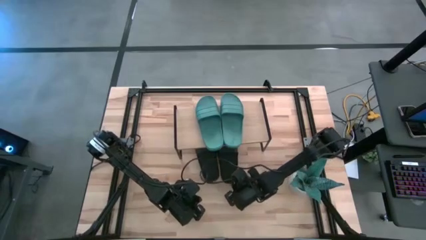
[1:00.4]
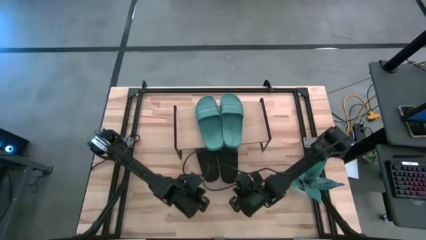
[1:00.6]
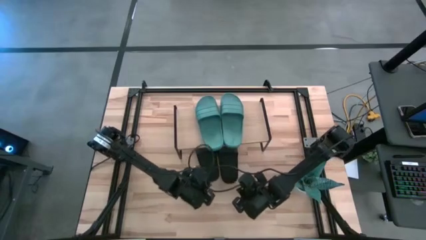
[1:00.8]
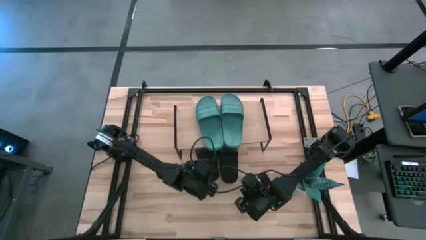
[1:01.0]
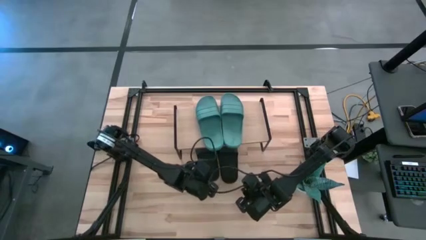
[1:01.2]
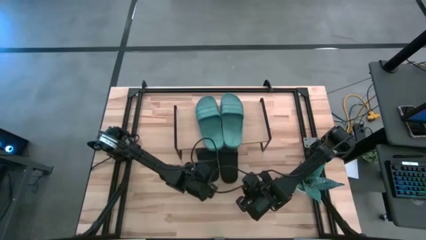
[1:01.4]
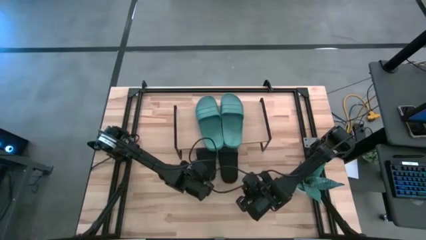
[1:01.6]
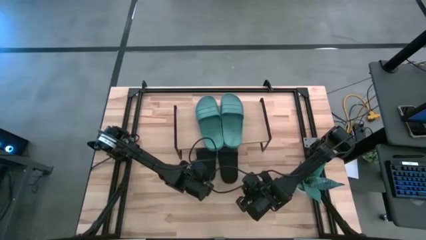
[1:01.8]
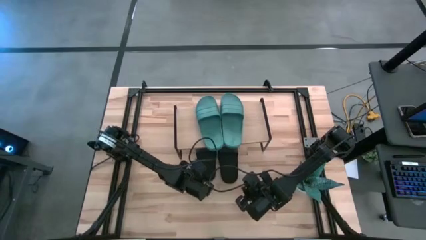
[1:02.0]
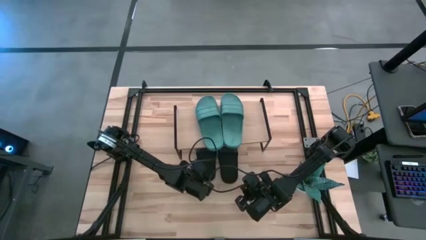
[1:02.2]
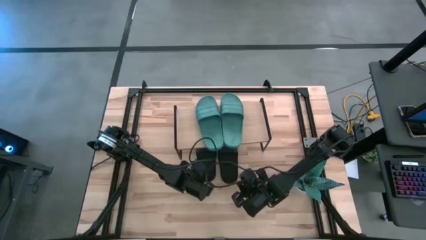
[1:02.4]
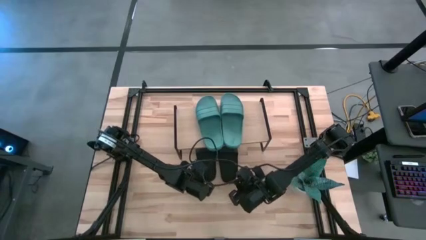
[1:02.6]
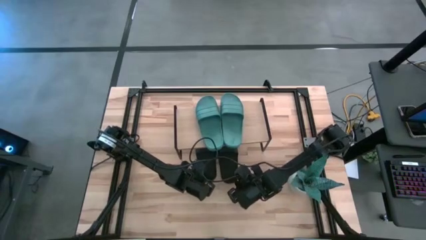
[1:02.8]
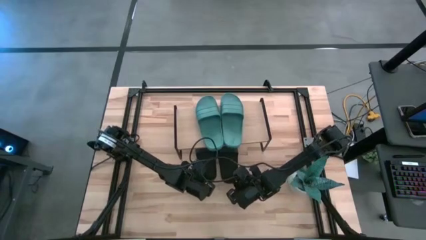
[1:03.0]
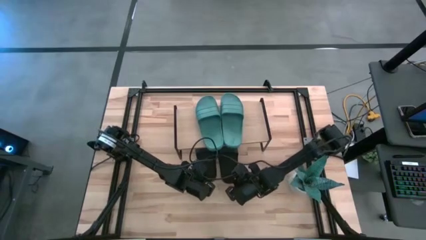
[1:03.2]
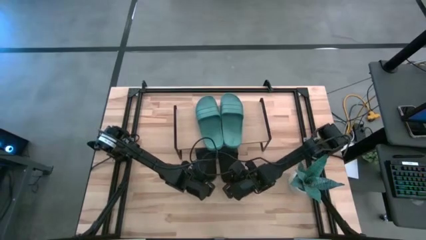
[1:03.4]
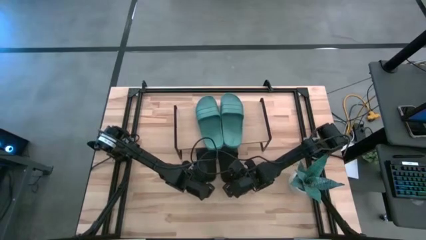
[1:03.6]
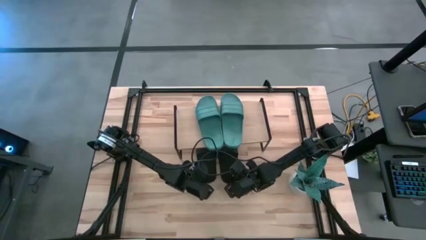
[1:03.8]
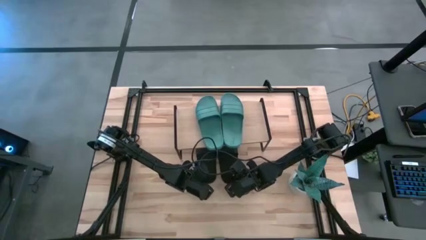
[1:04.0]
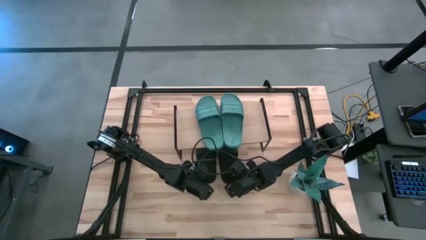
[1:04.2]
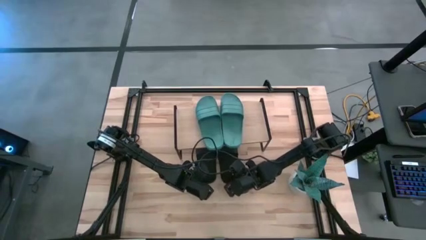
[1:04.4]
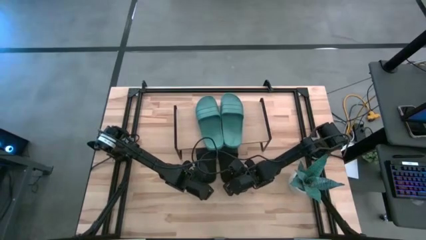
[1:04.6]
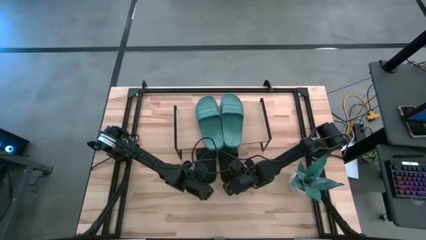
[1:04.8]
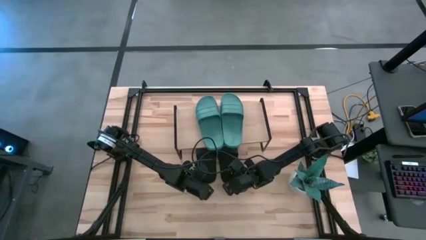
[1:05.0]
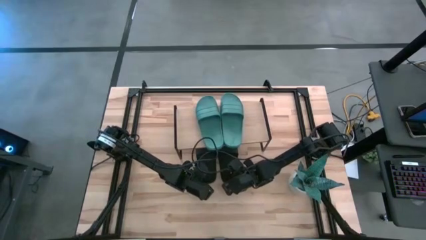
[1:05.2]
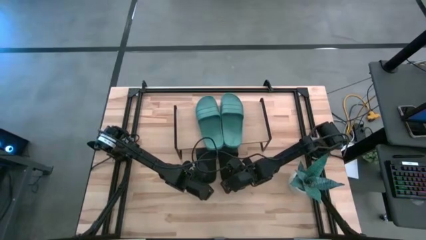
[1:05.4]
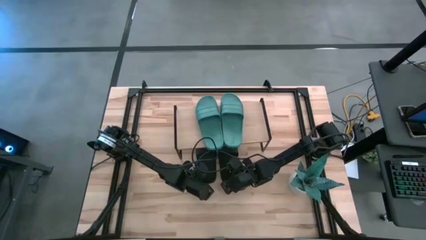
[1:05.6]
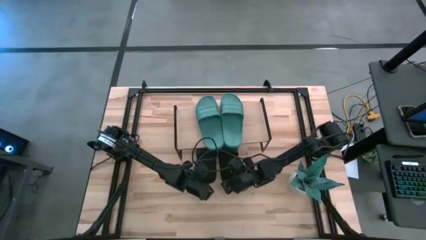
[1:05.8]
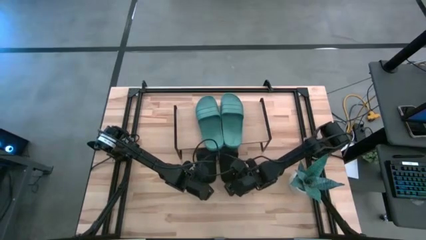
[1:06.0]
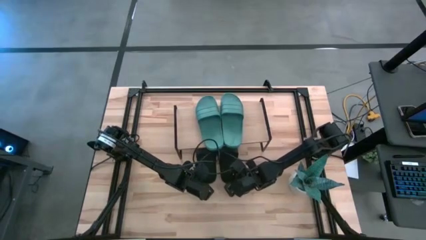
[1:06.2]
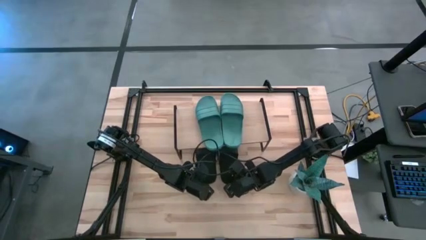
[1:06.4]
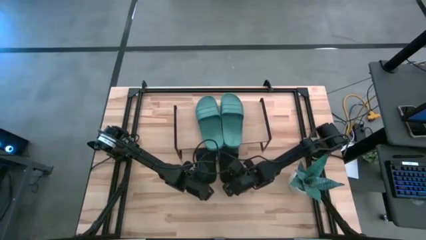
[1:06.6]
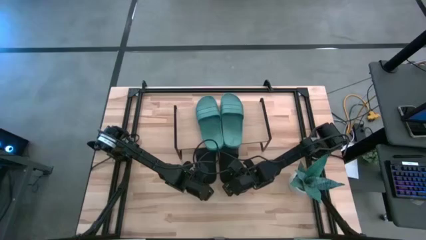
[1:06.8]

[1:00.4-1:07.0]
Task: Pick and place slides into the shelf
Move the right black slipper from the center of the table under the shelf

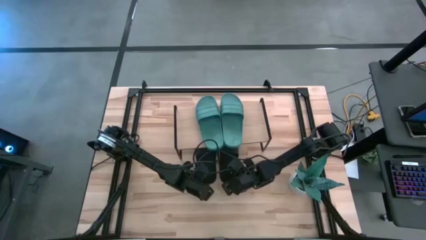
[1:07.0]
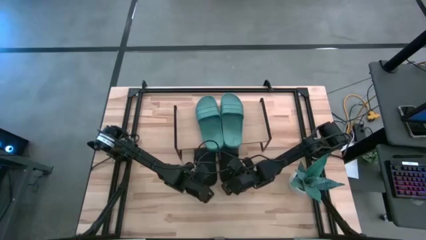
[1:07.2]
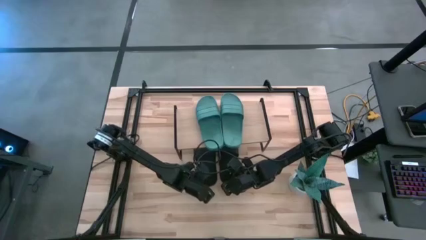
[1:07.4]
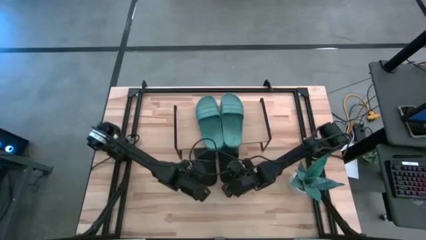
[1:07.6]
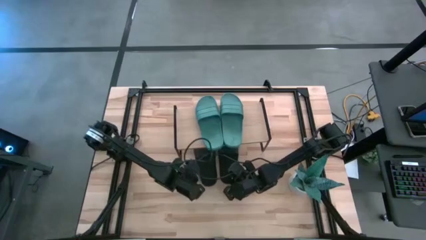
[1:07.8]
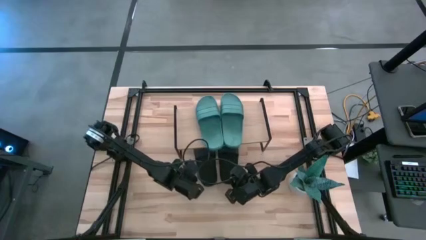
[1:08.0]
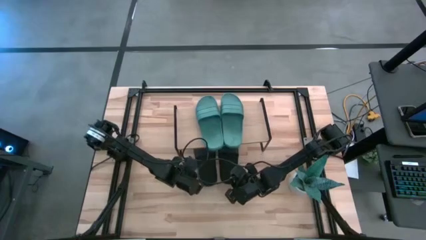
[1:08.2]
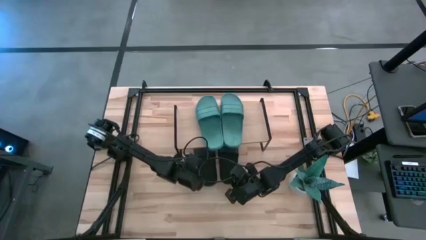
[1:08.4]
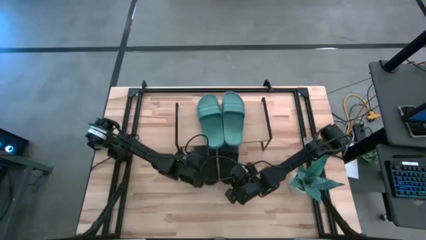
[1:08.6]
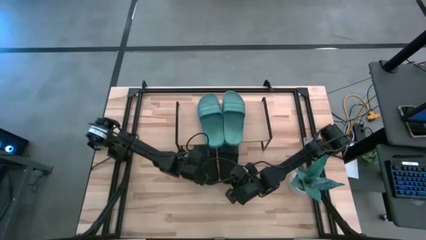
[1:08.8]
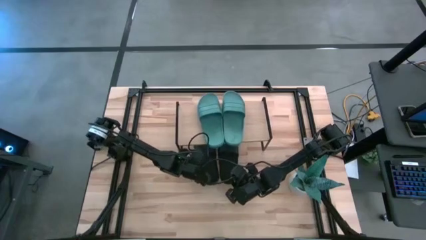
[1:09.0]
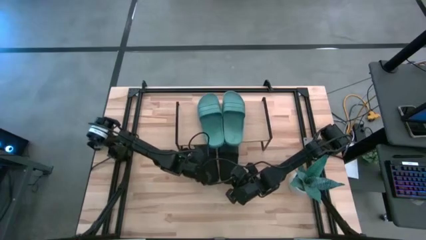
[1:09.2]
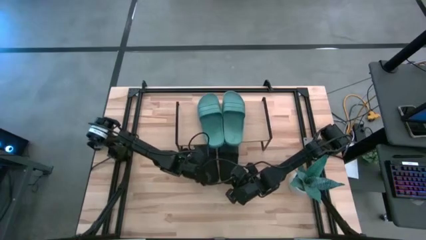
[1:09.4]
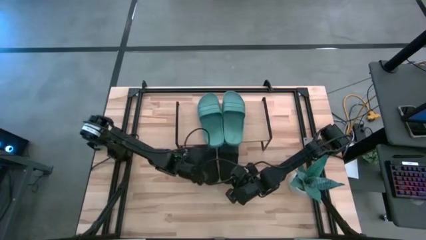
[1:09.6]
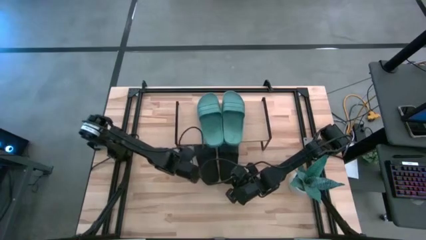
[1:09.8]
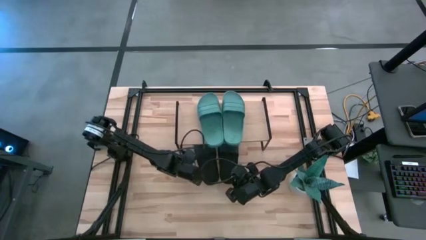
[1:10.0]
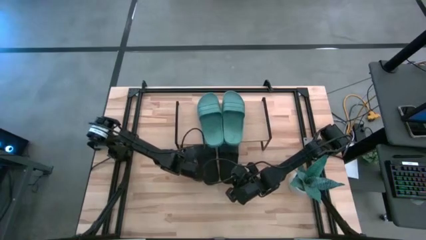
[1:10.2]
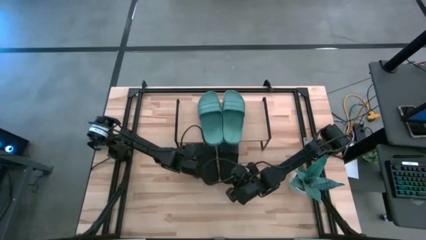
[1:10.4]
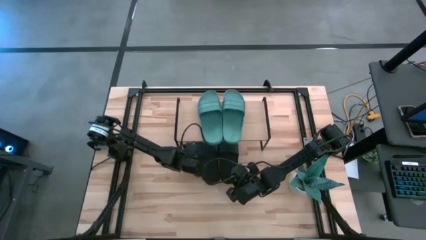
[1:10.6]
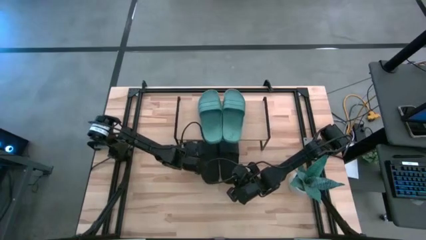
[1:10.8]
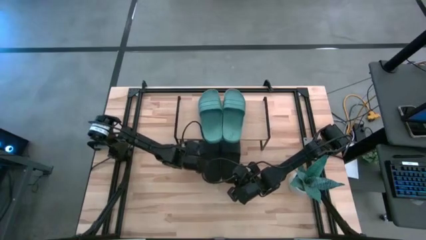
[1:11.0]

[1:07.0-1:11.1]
Adjust the left black slipper

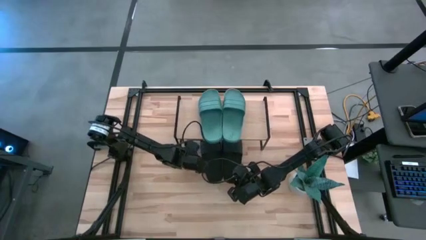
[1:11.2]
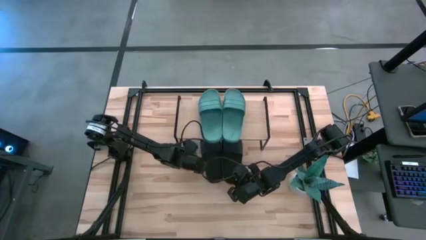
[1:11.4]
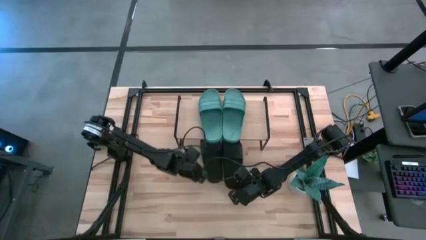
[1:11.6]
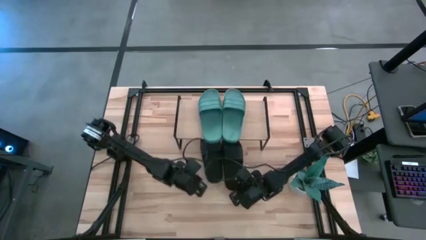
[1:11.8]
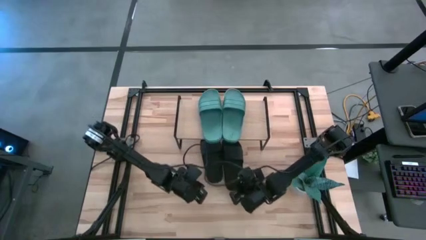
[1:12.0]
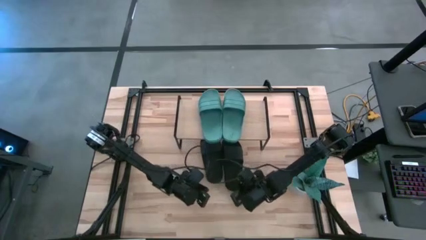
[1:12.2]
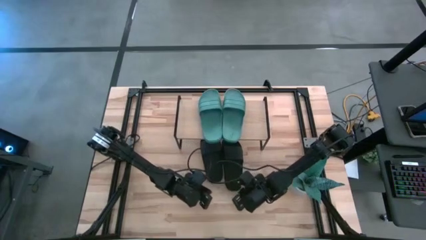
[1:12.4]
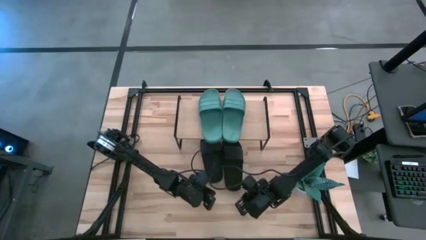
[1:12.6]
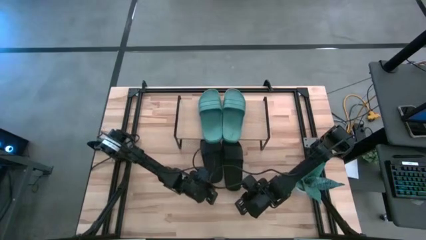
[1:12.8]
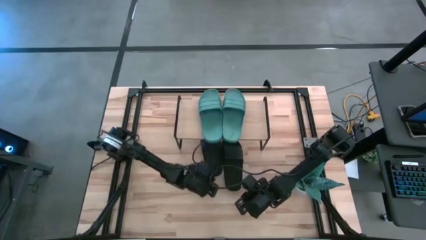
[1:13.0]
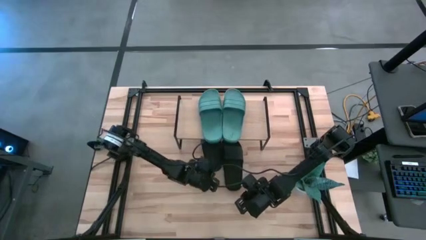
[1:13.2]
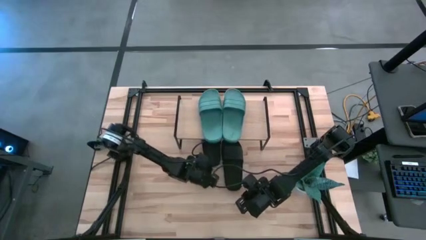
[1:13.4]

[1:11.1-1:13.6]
Move the left black slipper from the center of the table under the shelf

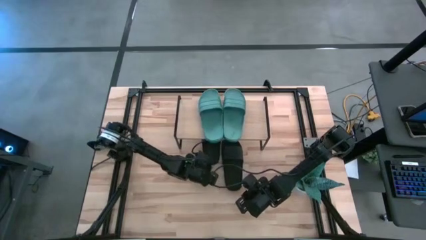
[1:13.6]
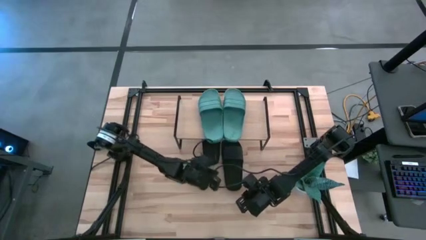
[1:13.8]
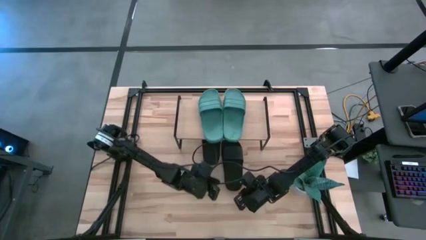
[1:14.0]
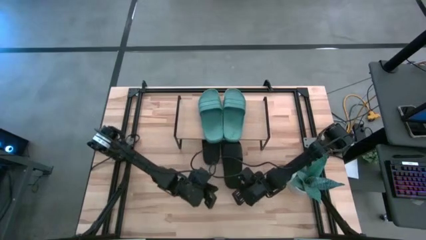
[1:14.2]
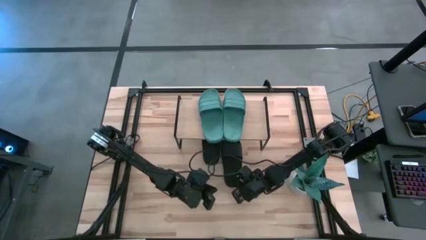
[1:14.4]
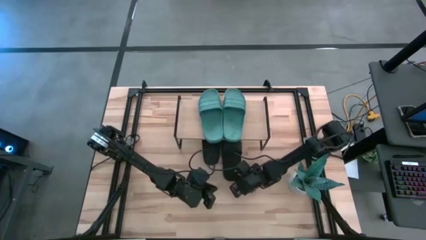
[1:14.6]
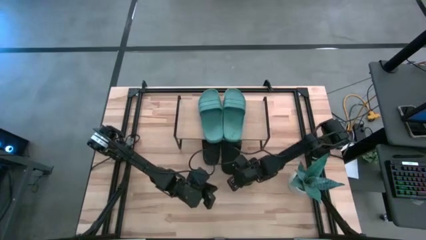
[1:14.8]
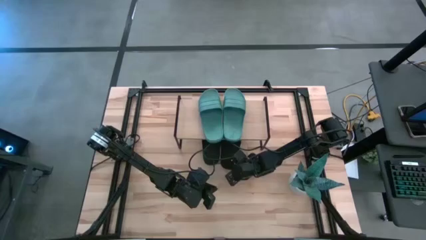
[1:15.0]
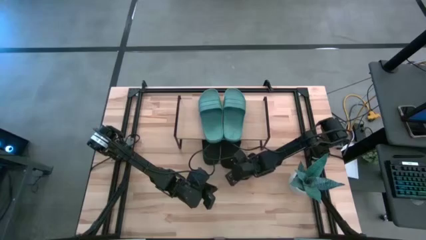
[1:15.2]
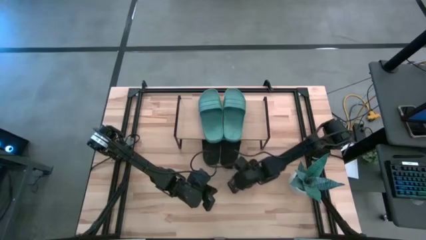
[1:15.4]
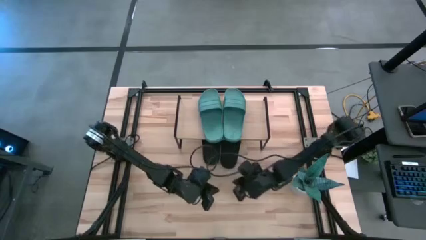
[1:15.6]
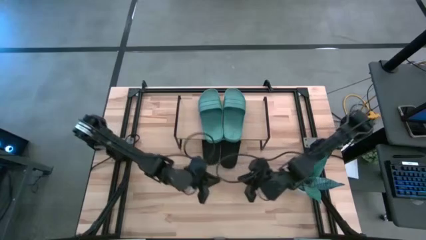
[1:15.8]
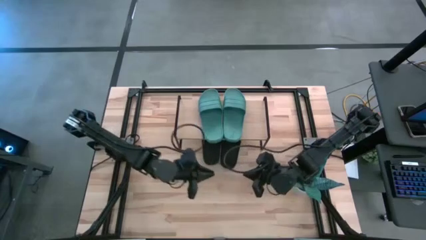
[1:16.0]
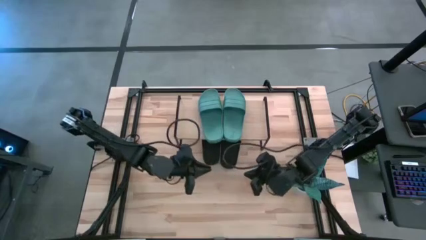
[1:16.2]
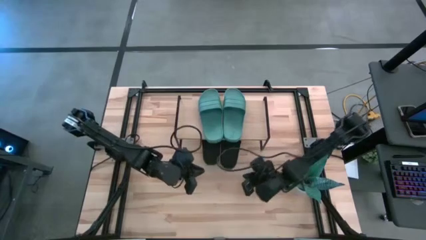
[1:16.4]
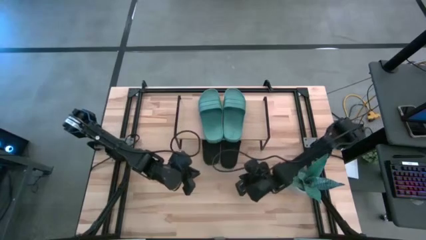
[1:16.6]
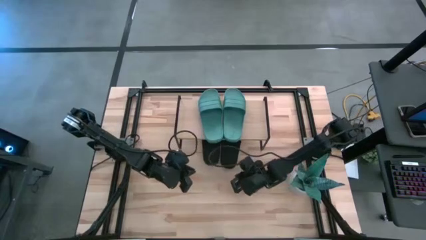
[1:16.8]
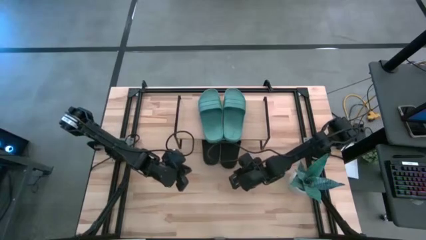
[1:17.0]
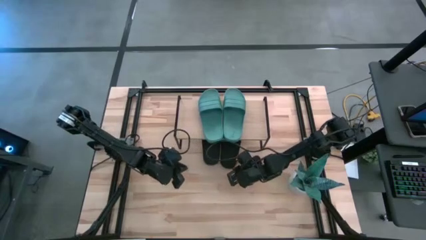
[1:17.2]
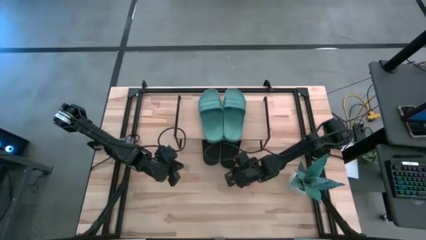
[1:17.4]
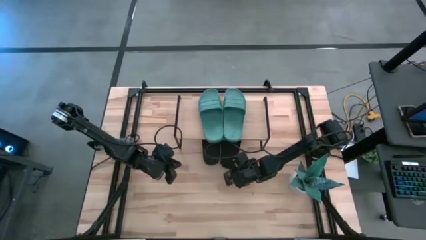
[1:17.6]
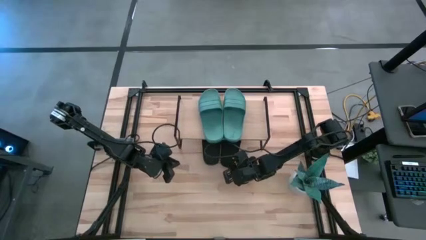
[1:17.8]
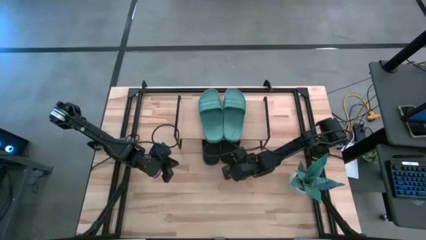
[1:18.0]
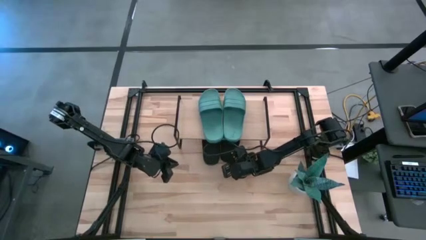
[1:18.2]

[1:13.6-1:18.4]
Move the right black slipper from the center of the table under the shelf
